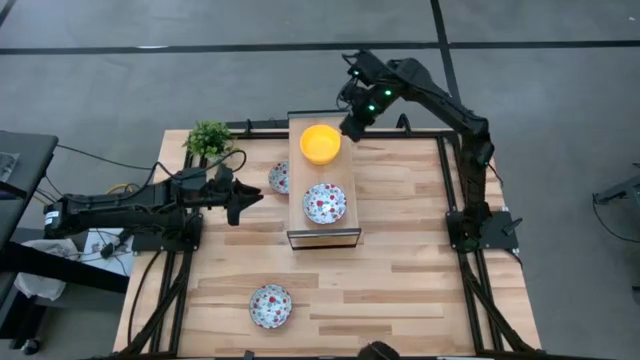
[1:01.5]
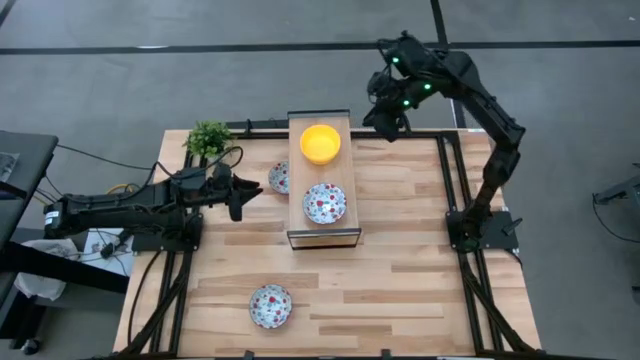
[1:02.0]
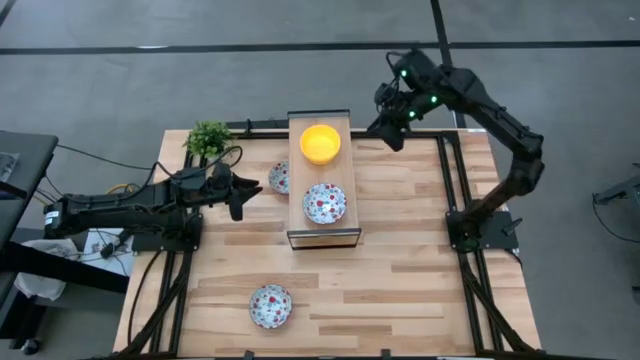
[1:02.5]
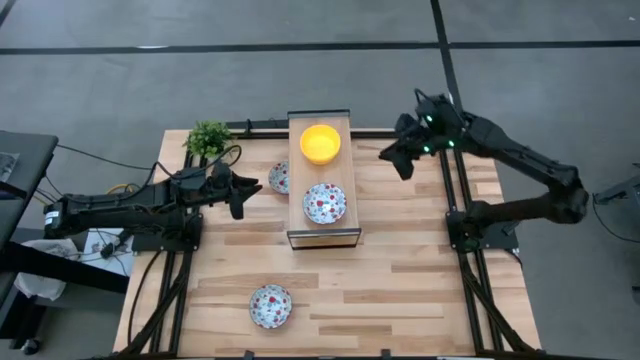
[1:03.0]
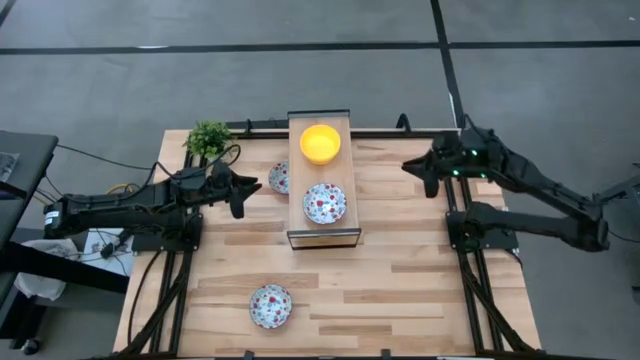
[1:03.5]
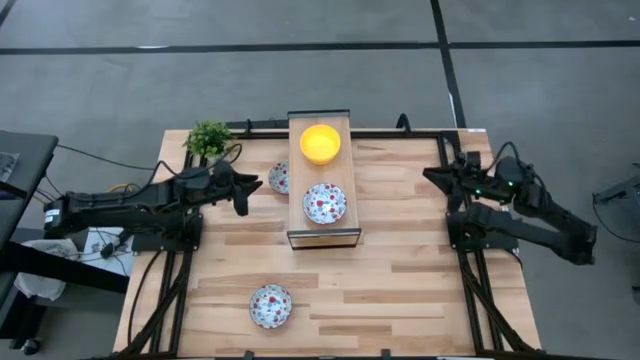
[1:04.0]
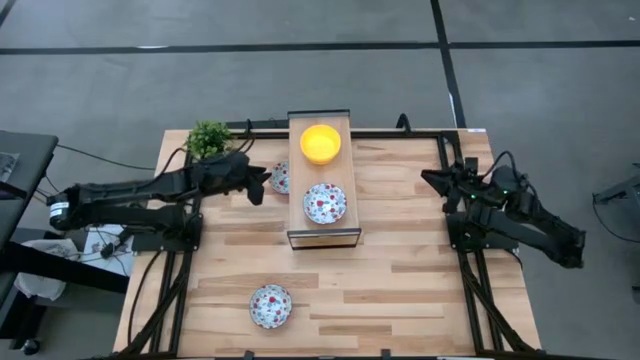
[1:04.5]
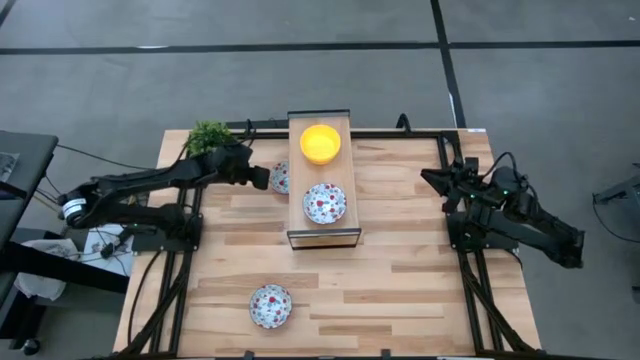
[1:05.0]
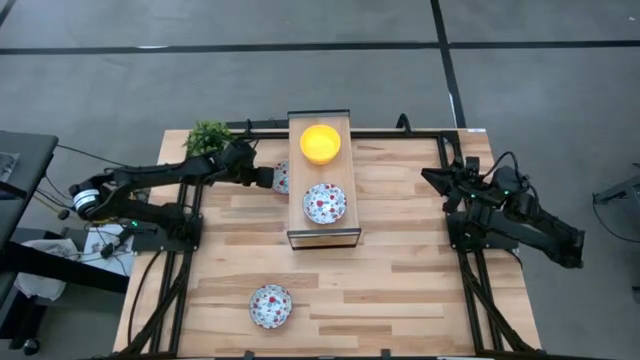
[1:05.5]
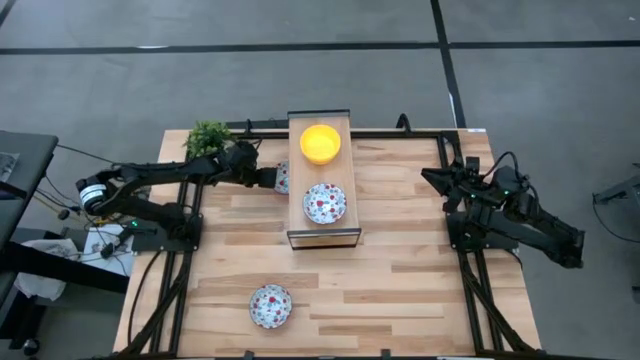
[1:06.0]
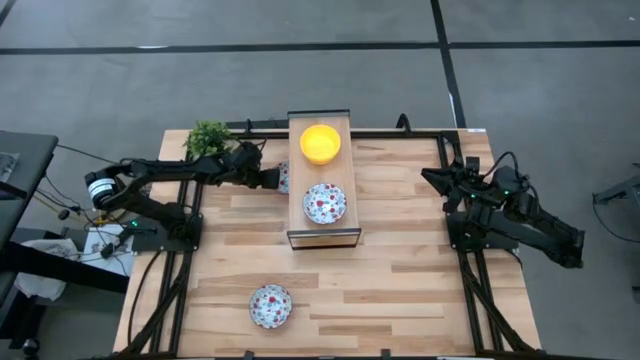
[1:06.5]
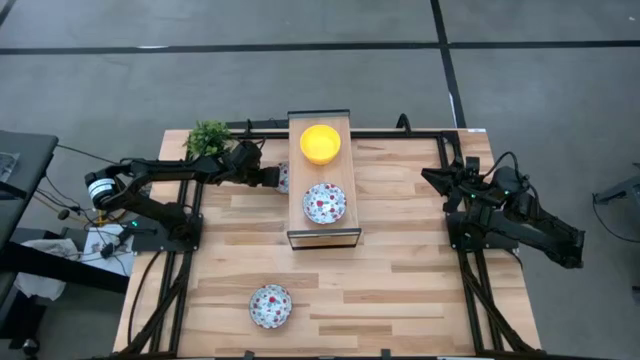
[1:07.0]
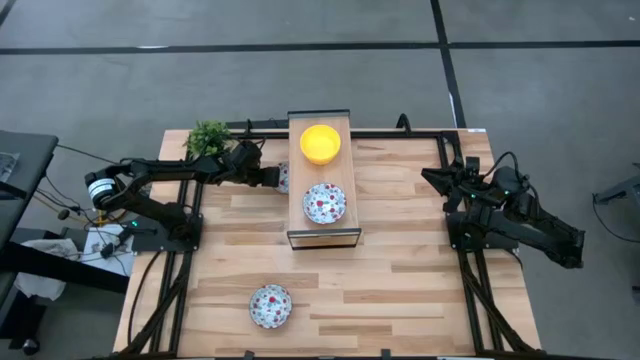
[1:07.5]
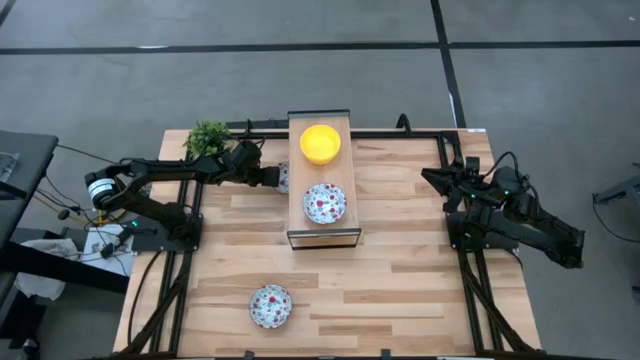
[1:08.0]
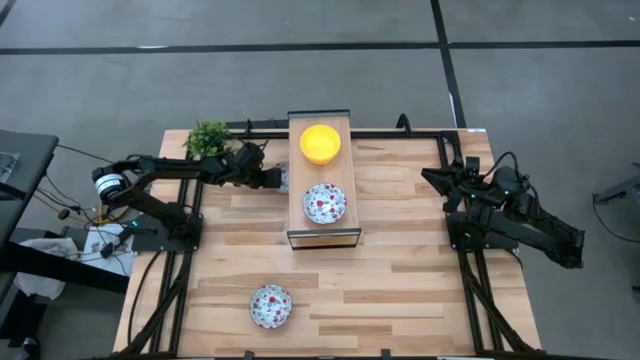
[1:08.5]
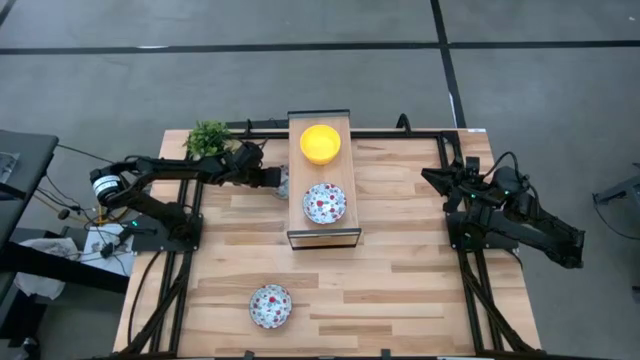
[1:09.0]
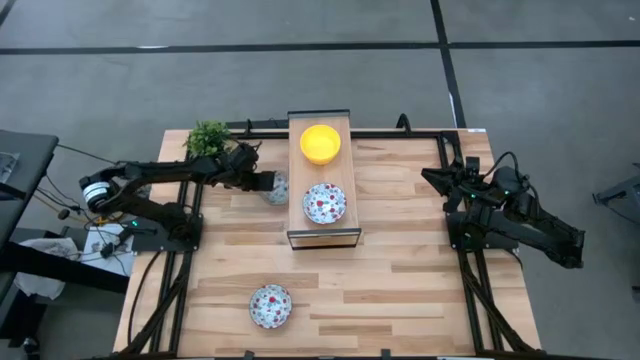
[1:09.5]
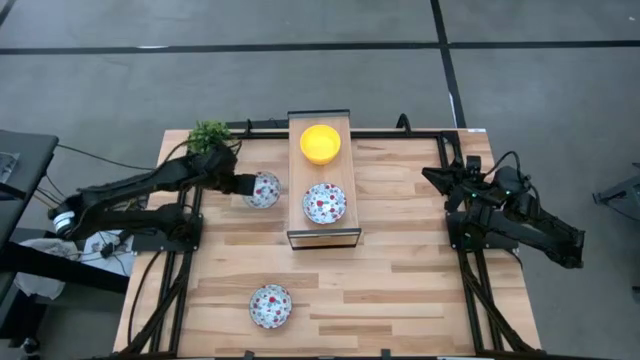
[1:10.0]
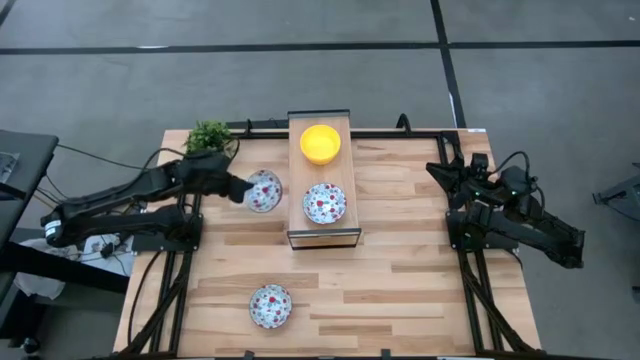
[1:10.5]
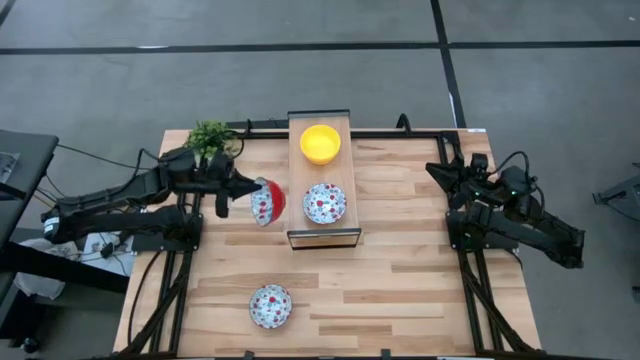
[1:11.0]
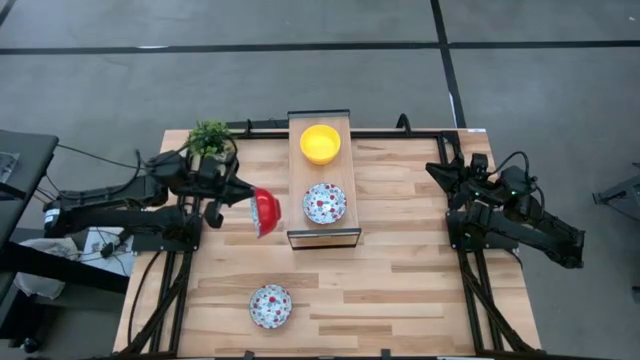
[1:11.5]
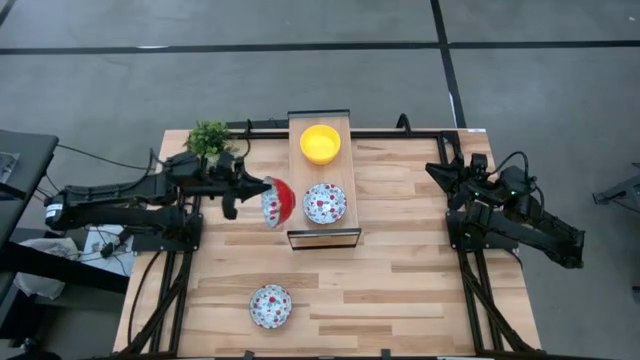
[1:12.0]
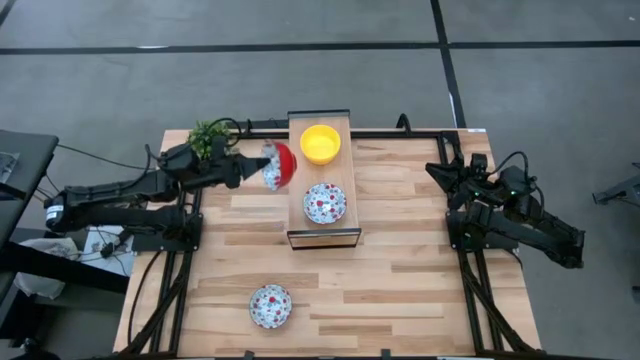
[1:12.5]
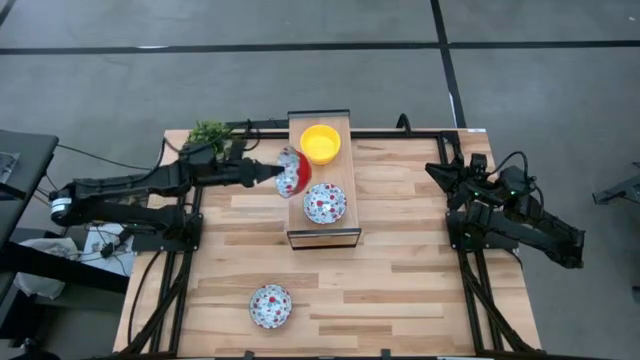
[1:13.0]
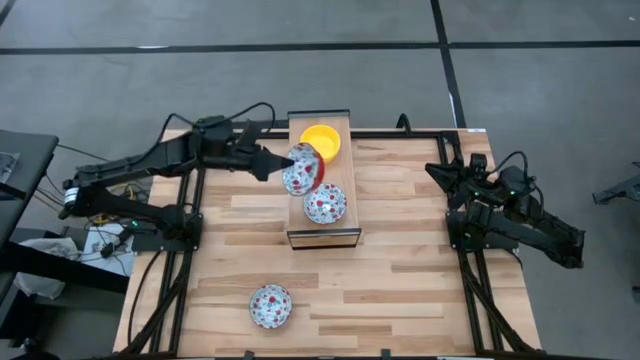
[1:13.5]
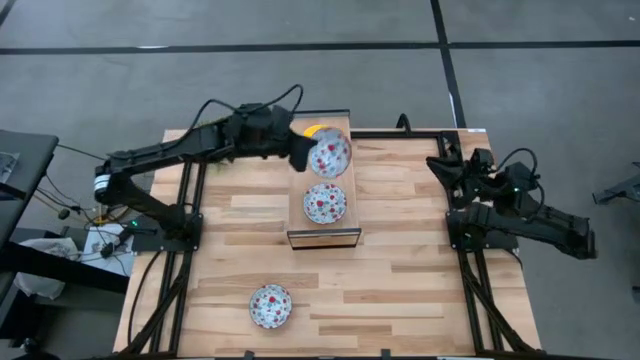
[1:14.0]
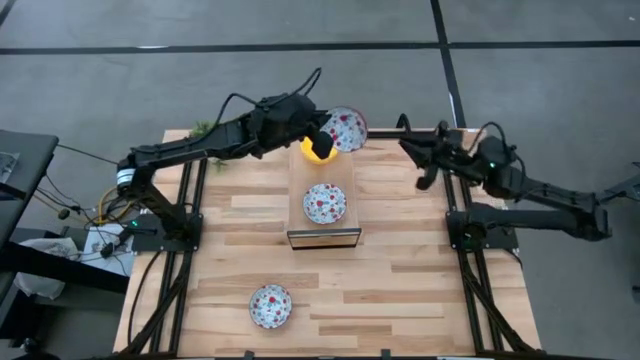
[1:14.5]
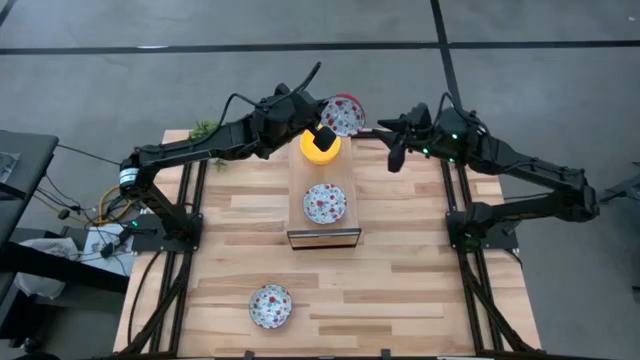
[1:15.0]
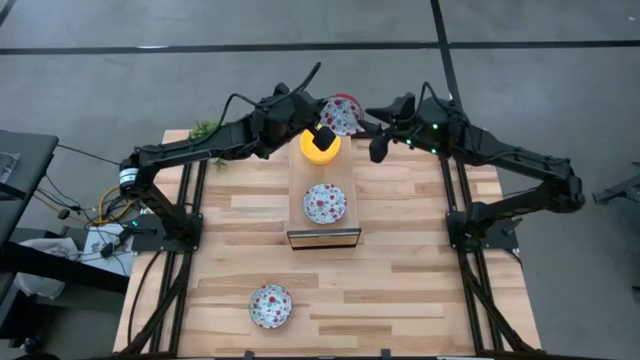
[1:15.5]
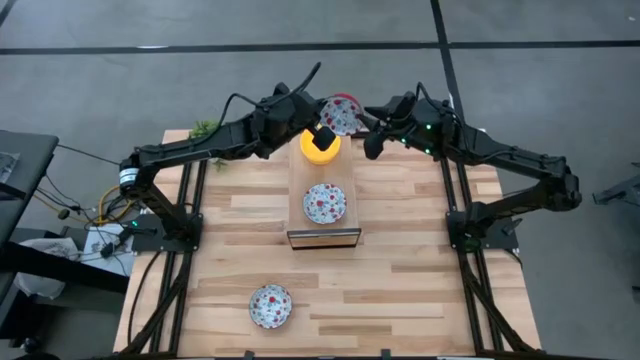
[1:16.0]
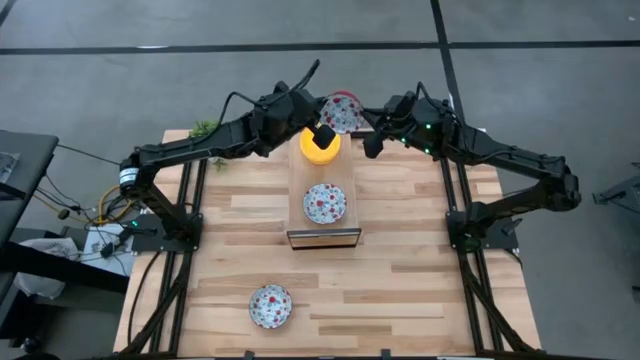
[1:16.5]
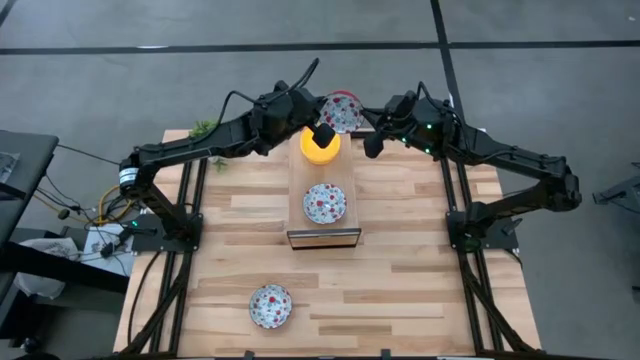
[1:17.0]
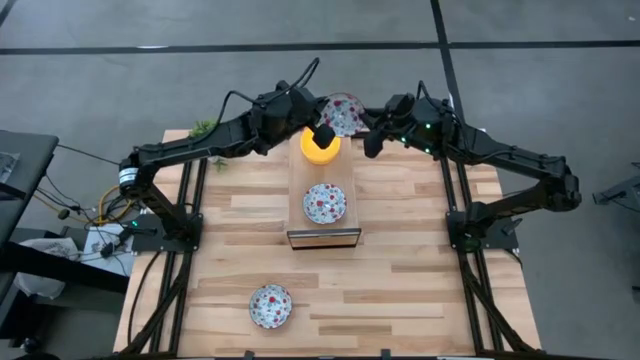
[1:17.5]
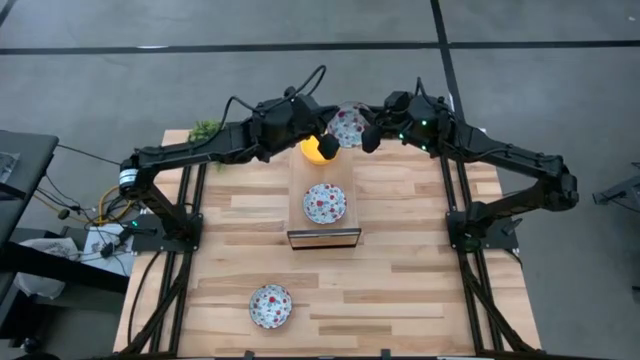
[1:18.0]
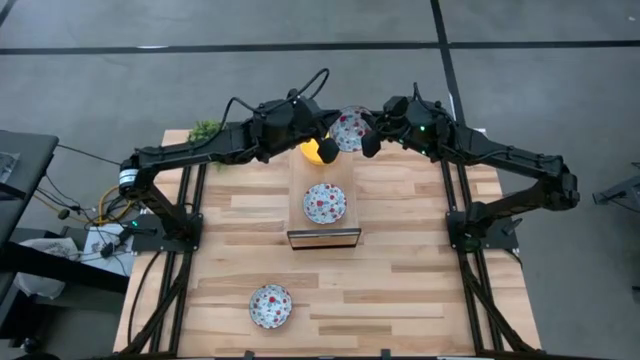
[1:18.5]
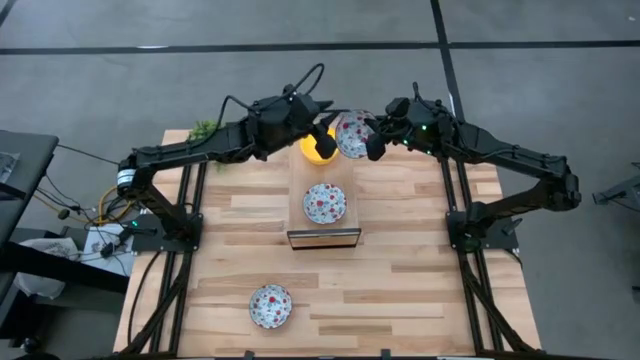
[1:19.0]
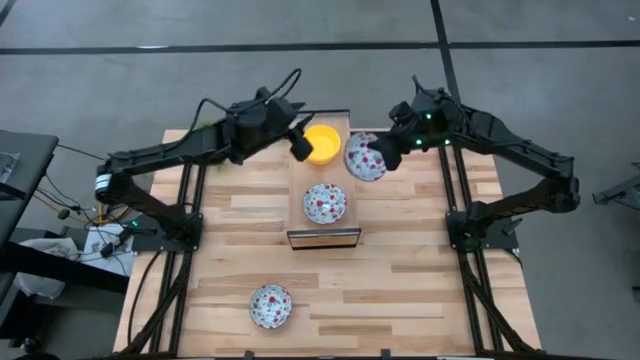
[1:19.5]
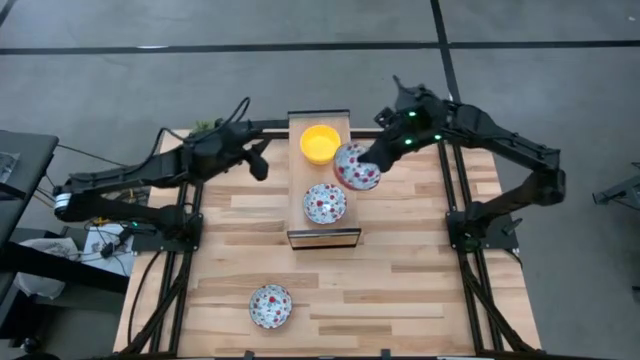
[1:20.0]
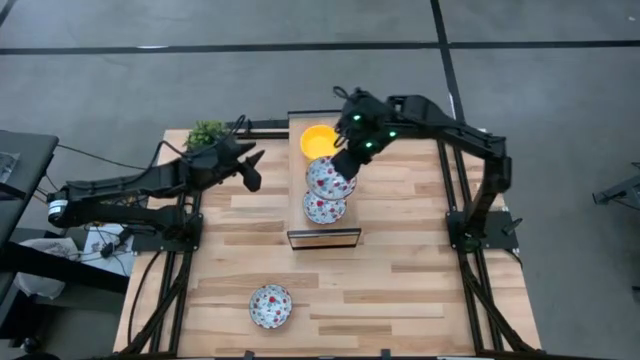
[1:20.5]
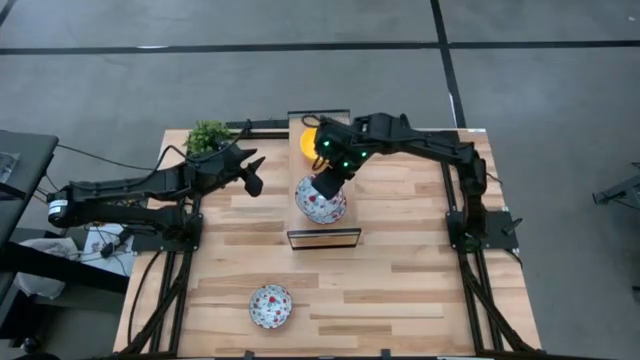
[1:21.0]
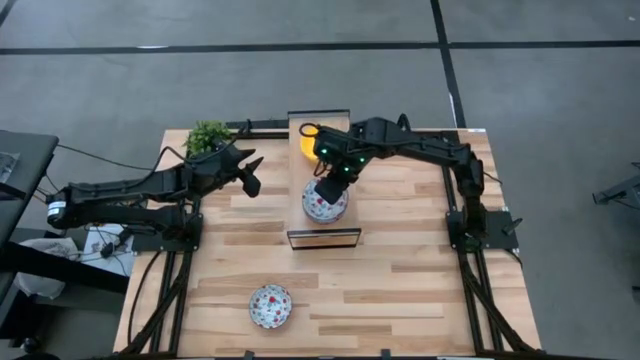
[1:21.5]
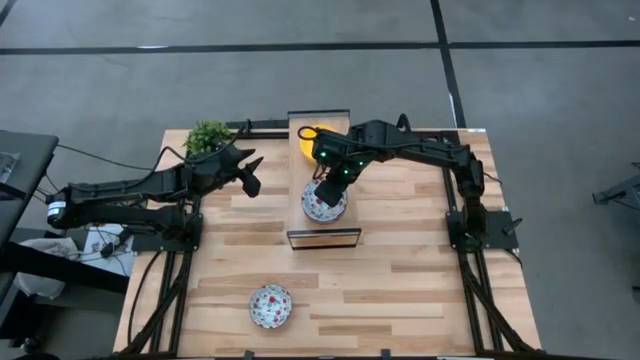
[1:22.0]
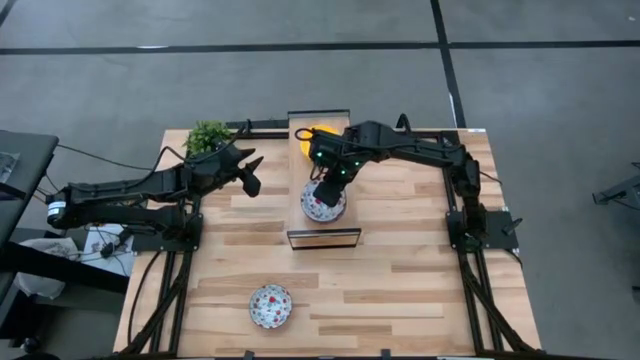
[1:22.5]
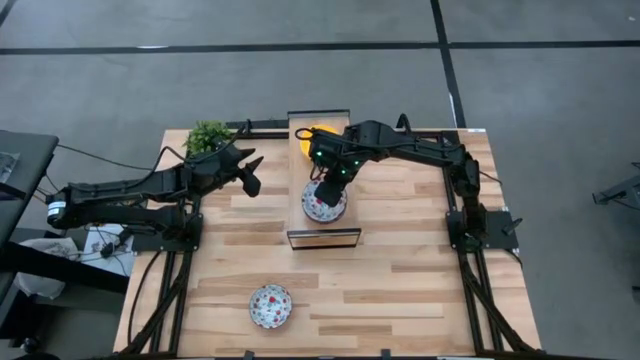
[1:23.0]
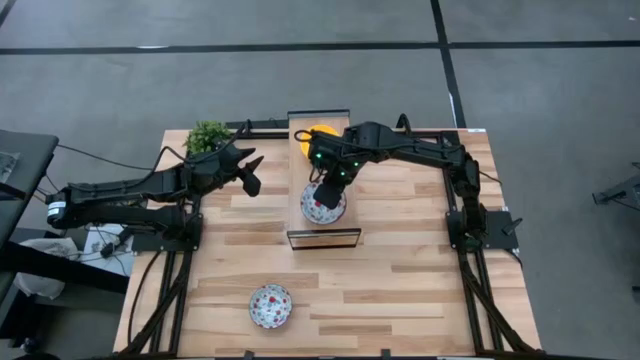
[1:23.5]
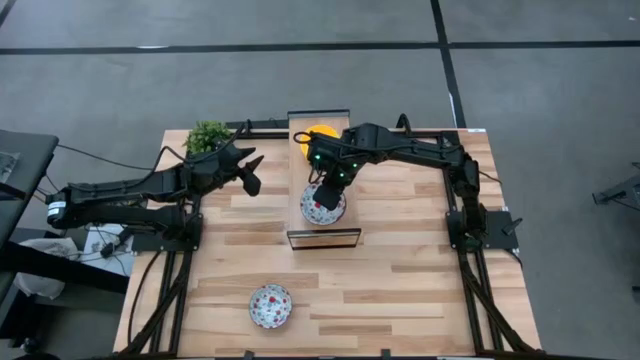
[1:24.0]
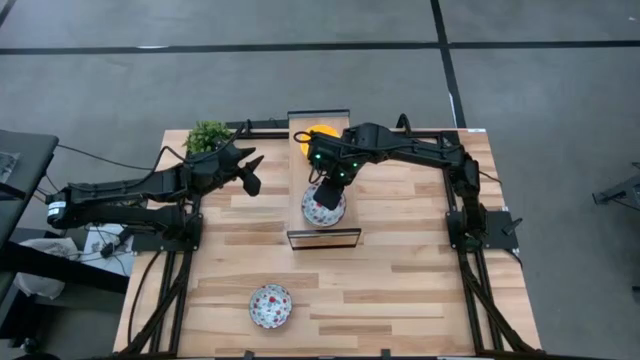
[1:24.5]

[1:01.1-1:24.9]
Task: Pick & Place Mini bowls
Stack the top red patterned bowl on top of the red patterned bowl on the shelf
